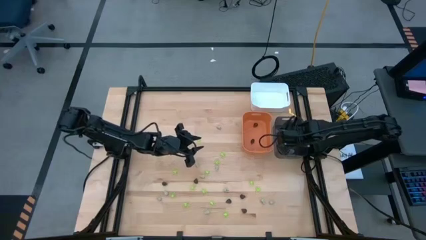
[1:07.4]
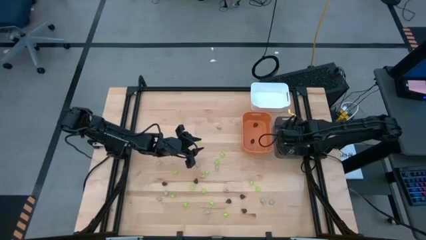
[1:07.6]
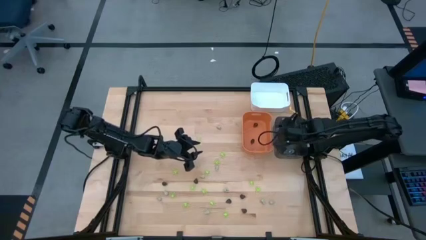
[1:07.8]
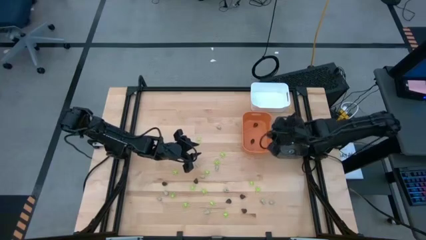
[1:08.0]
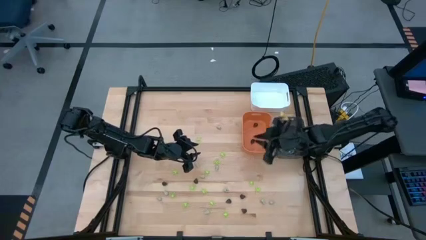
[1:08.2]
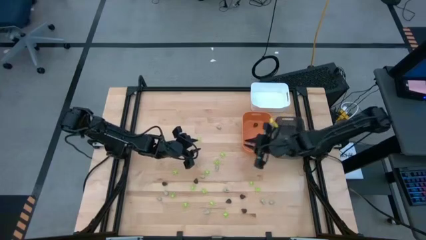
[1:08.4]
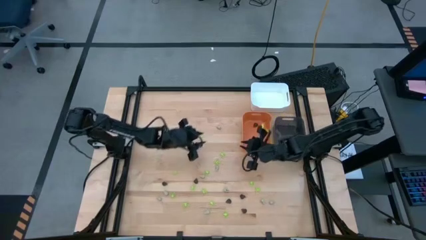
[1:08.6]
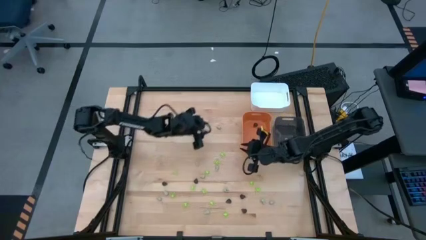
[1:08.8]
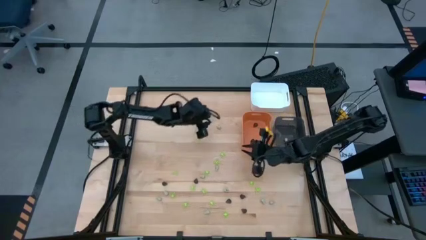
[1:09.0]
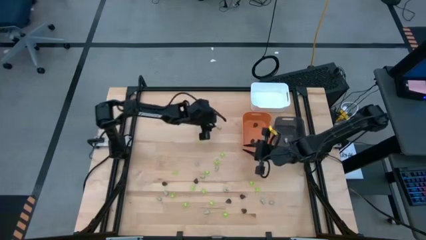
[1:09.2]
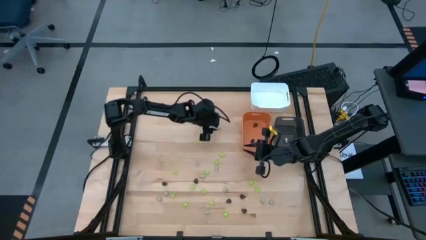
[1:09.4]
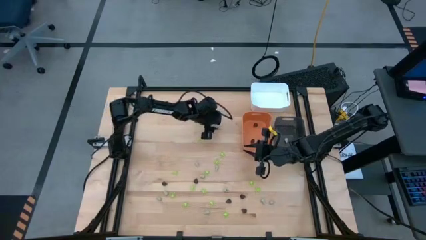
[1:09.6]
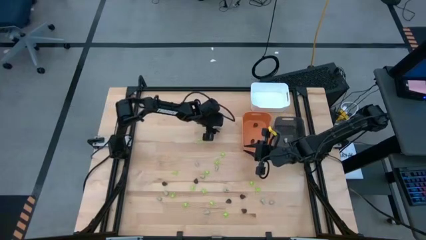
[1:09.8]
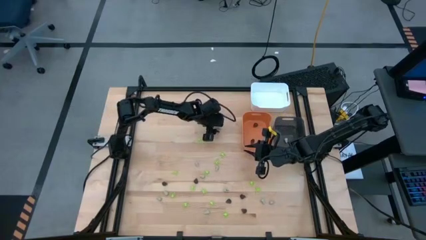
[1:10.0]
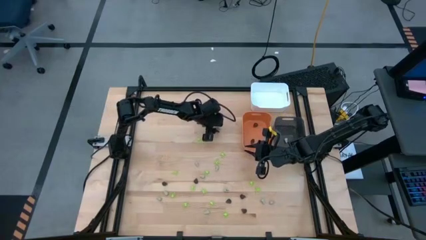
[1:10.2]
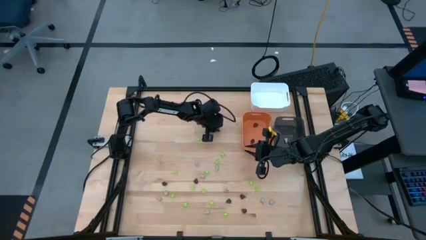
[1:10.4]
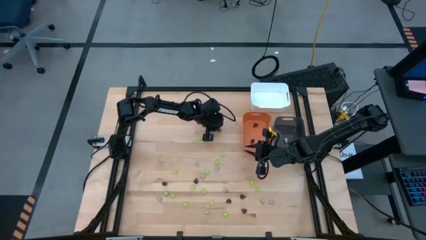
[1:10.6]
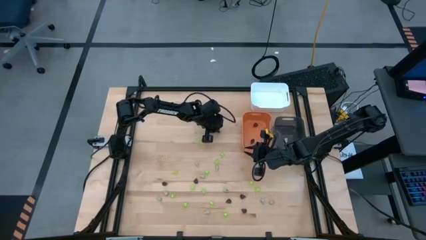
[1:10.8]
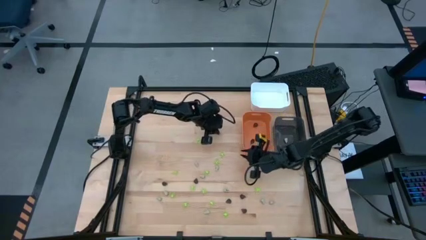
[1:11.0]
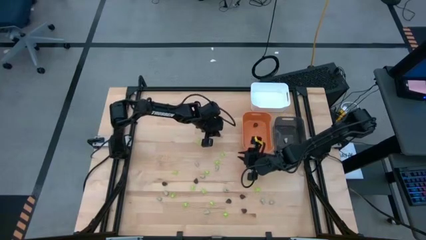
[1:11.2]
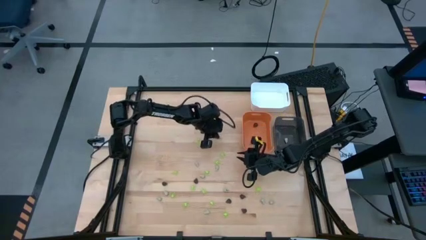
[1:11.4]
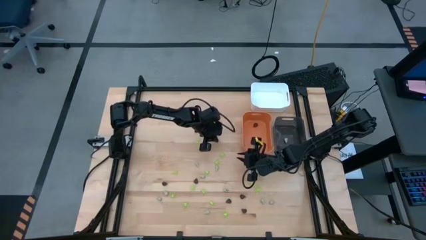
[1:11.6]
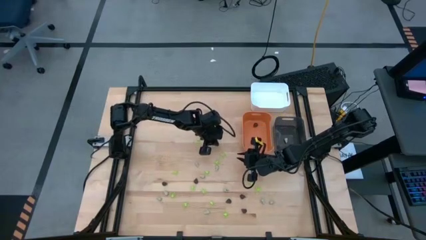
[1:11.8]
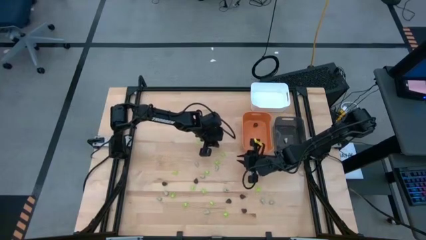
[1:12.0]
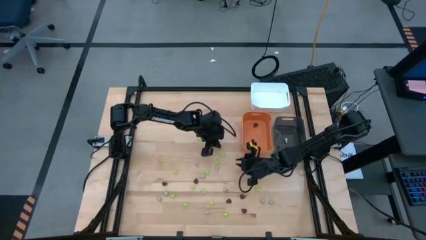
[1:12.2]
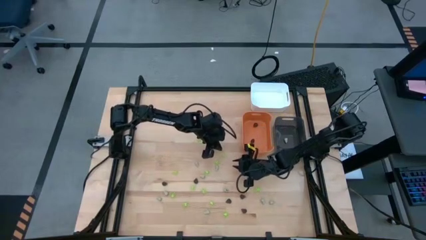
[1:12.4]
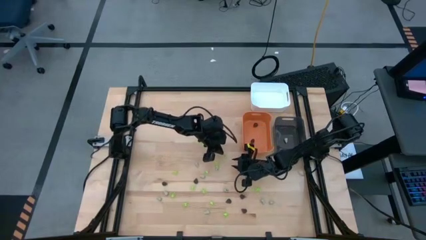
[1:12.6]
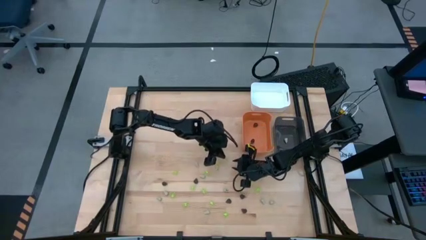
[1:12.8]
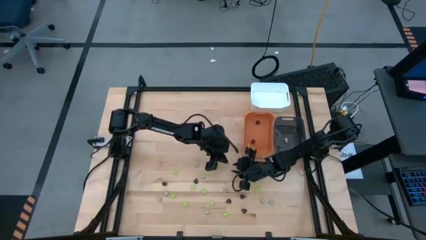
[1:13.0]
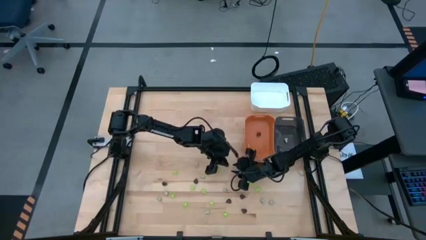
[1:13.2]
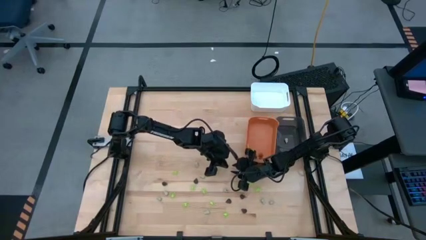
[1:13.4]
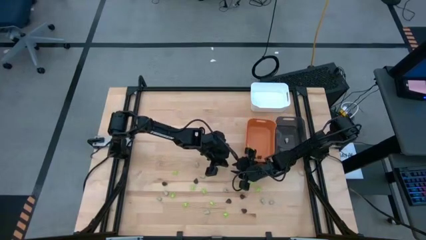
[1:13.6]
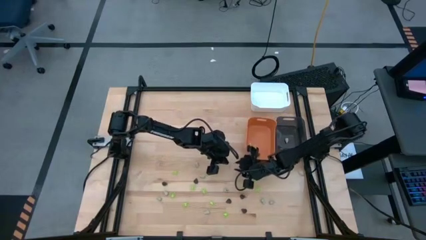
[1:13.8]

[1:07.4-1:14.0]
Task: Sort Halloween decoration
Put the white skull toy into the black bin

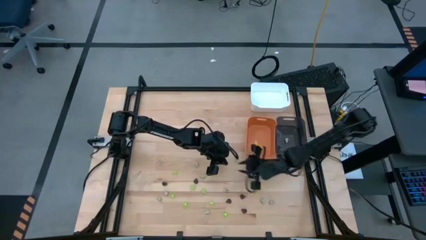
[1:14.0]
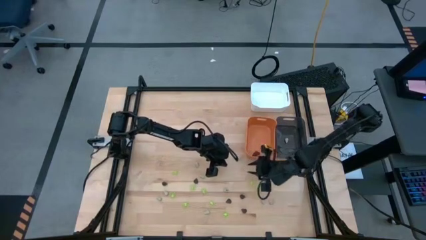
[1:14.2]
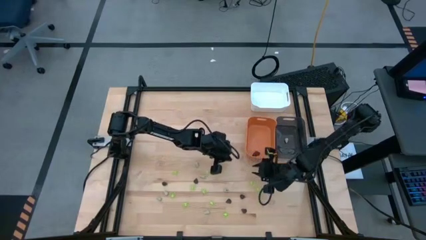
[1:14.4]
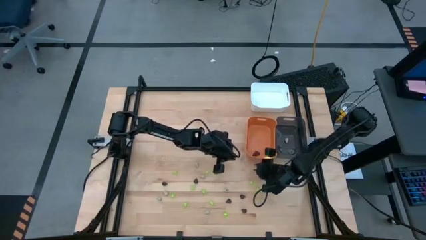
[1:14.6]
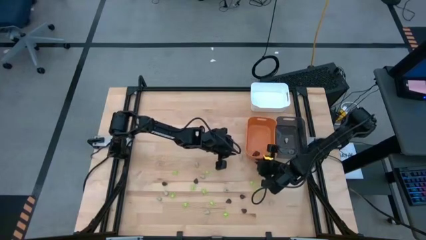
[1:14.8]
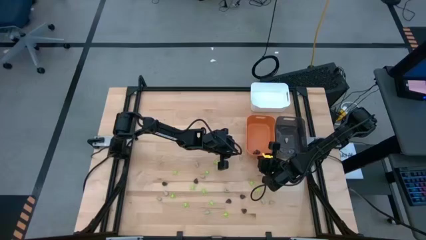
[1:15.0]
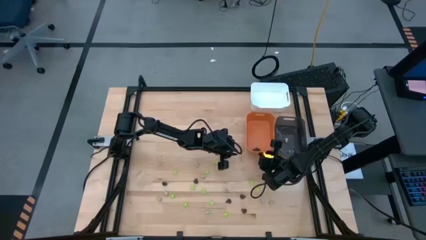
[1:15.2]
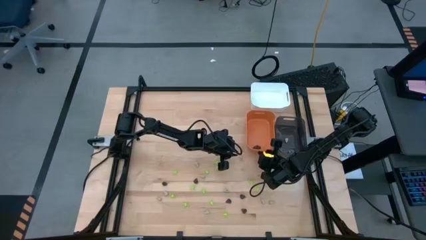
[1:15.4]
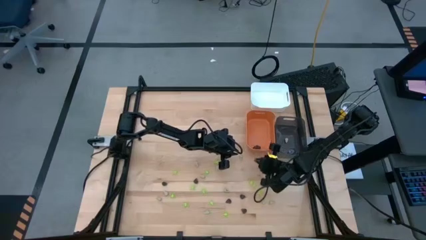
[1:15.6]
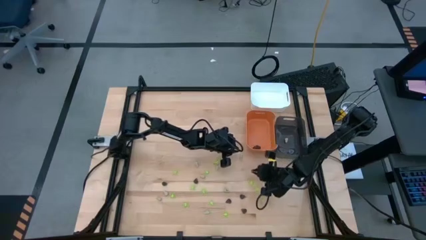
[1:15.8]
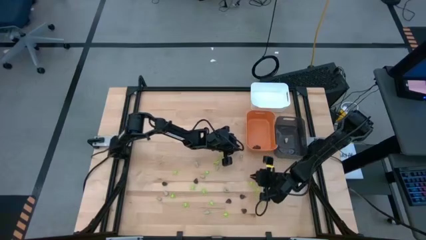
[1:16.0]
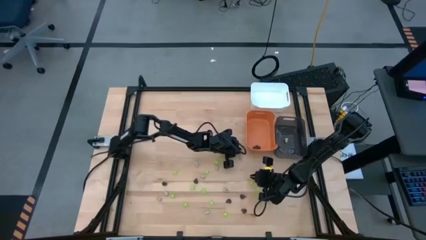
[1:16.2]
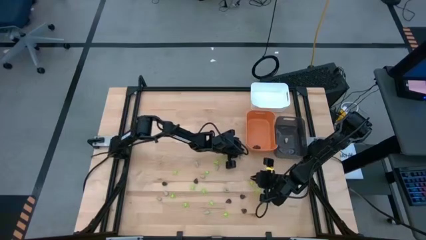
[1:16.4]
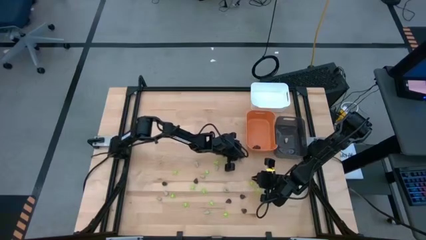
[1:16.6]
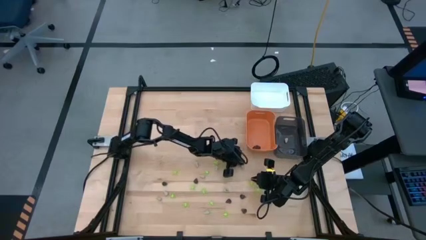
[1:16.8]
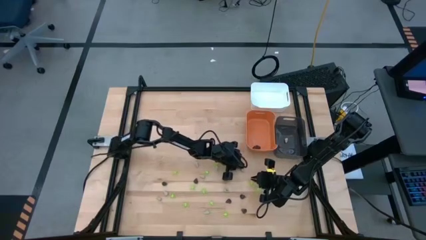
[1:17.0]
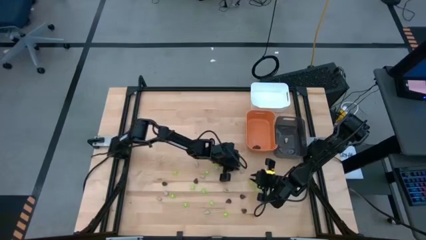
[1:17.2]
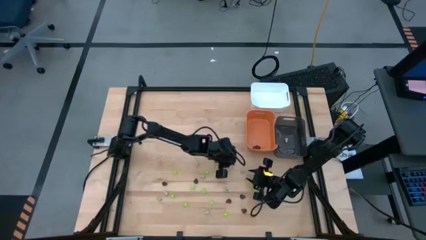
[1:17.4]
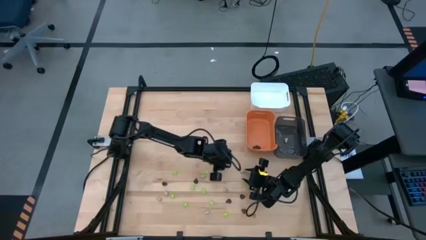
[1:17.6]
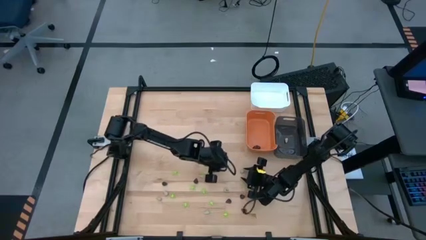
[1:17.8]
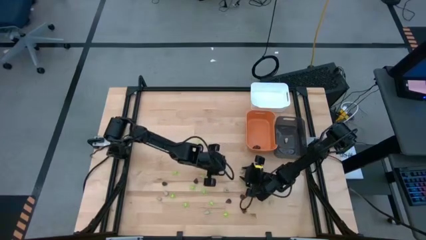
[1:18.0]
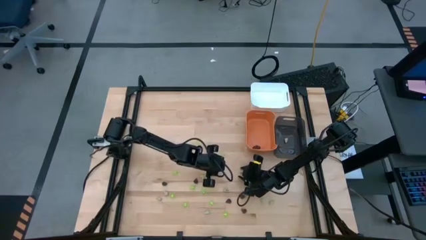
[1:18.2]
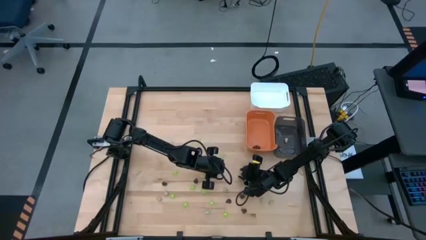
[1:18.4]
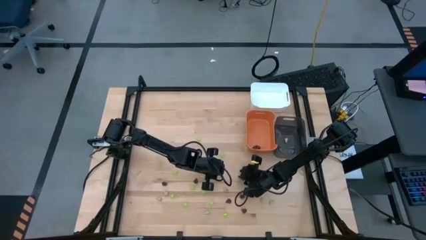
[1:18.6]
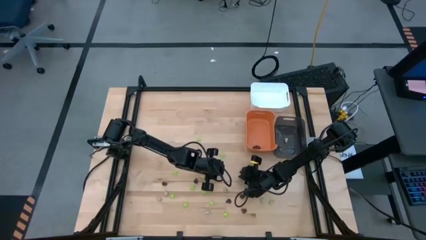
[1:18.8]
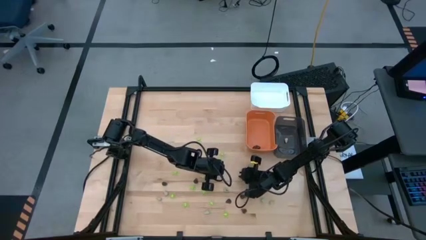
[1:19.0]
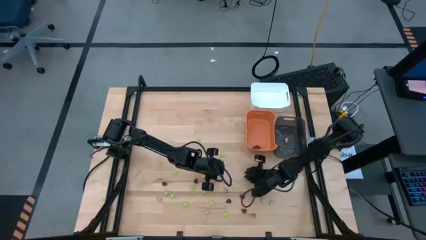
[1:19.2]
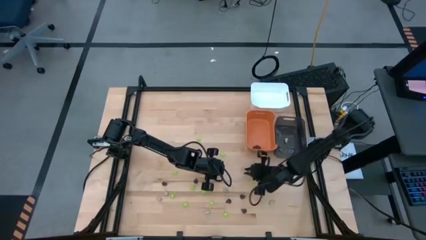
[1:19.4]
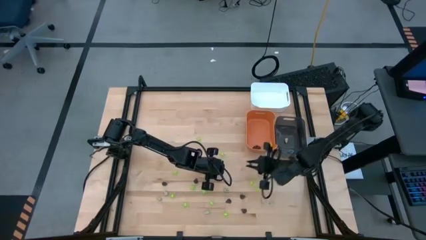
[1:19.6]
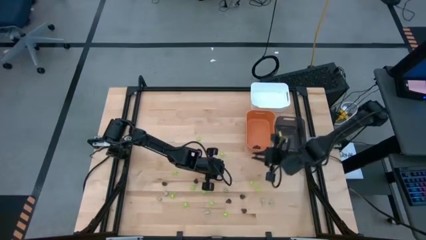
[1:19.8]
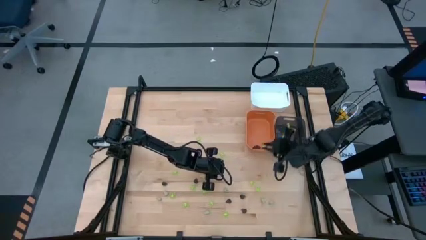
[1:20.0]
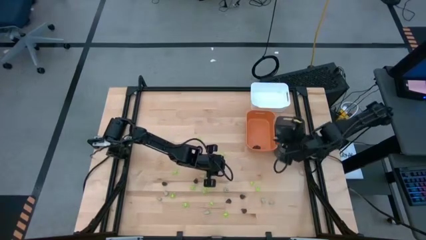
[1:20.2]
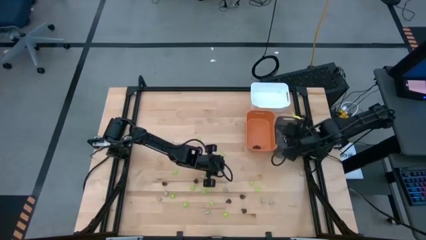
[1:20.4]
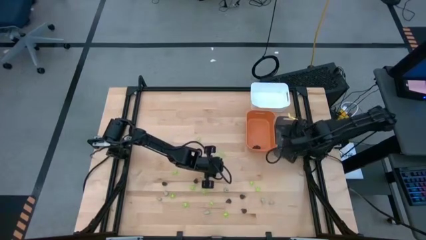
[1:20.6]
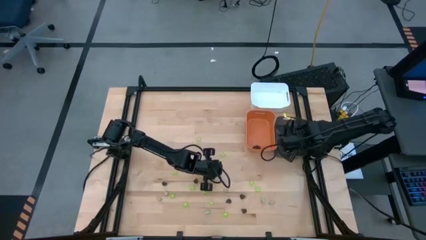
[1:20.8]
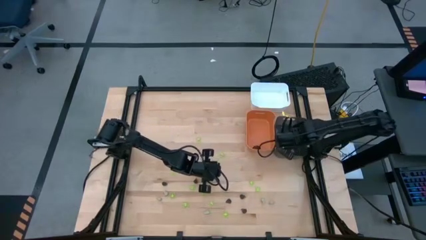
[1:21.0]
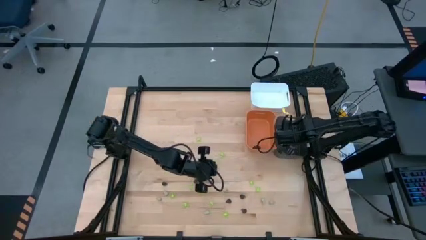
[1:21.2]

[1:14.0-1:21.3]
Put the white skull toy into the black bin
